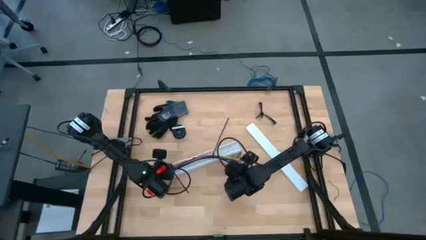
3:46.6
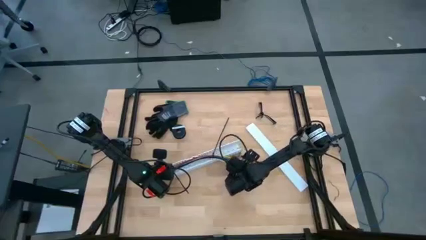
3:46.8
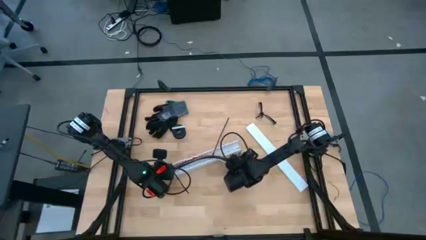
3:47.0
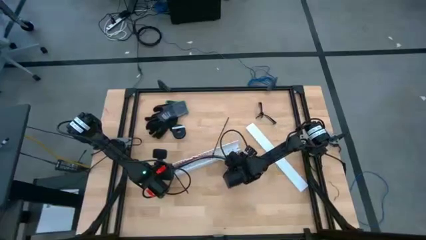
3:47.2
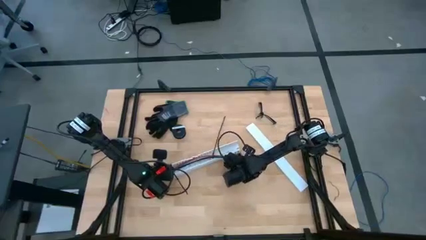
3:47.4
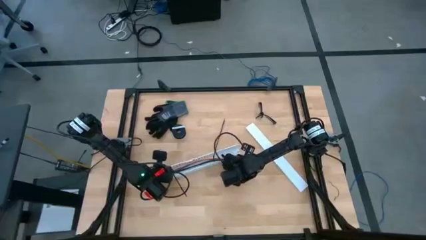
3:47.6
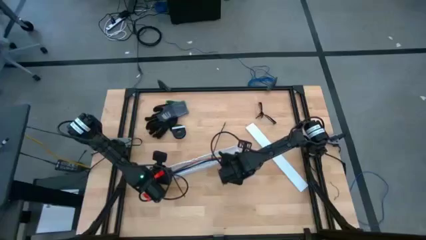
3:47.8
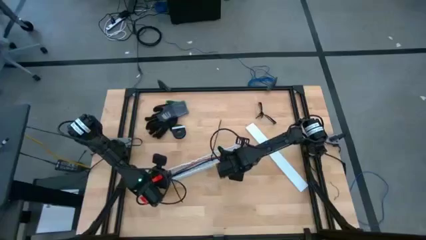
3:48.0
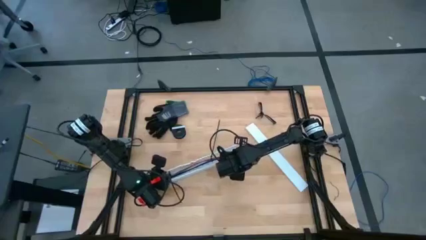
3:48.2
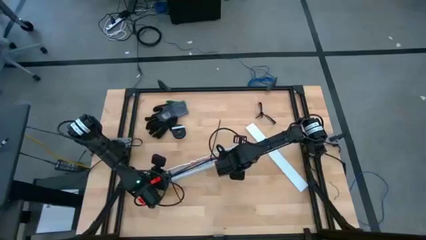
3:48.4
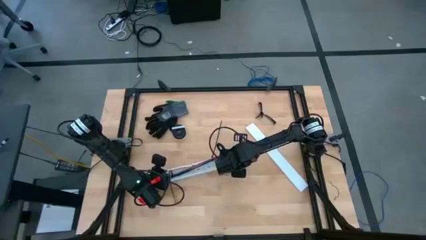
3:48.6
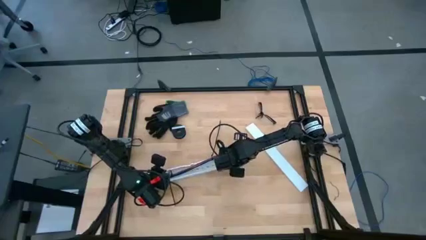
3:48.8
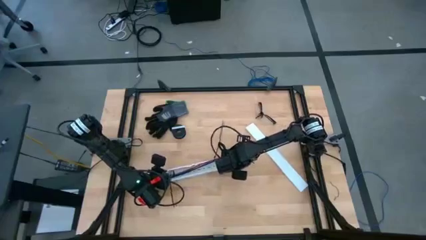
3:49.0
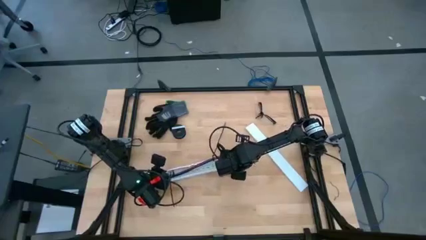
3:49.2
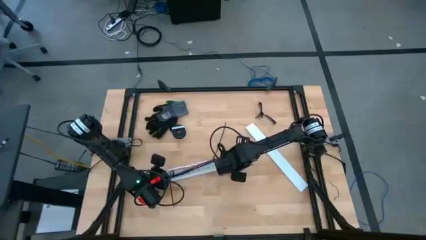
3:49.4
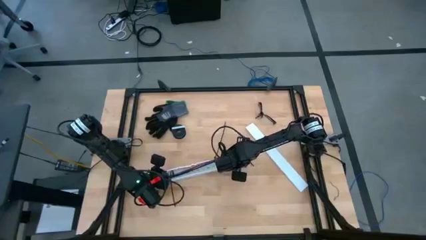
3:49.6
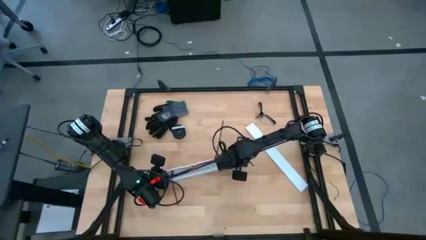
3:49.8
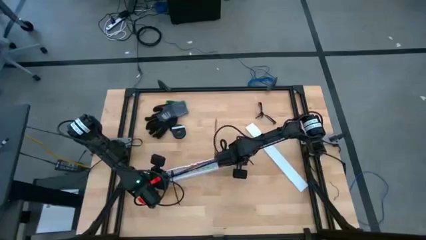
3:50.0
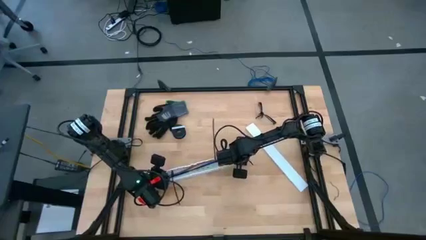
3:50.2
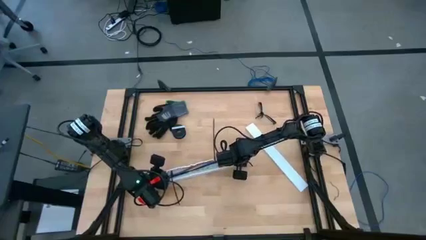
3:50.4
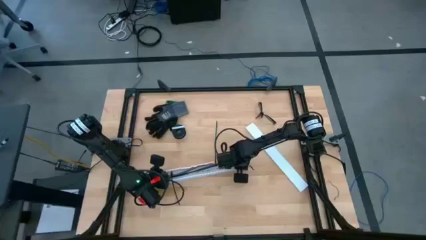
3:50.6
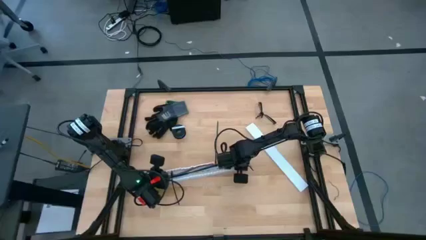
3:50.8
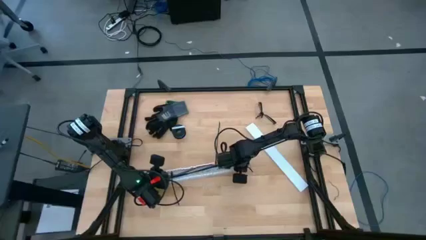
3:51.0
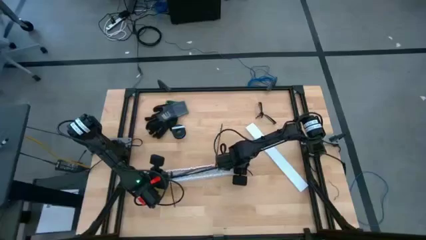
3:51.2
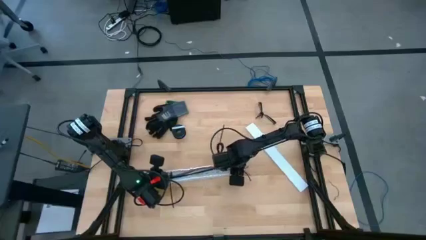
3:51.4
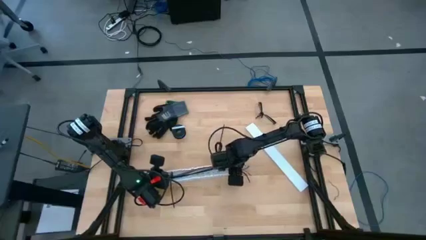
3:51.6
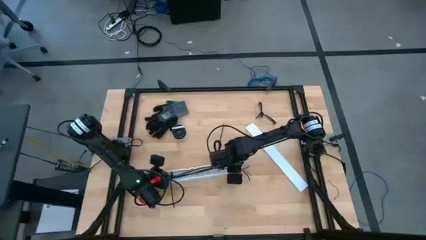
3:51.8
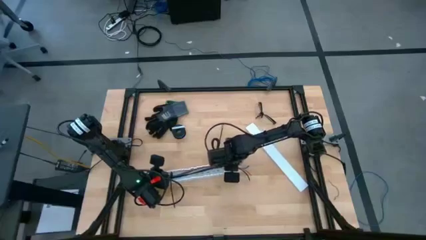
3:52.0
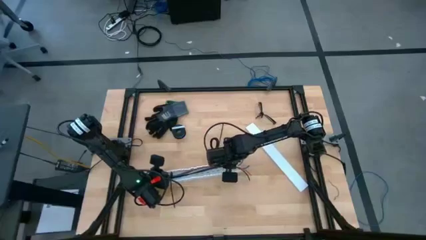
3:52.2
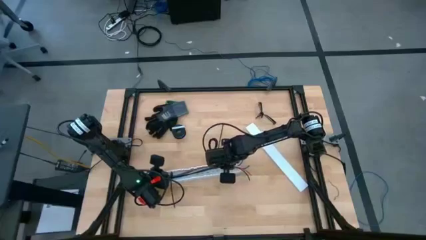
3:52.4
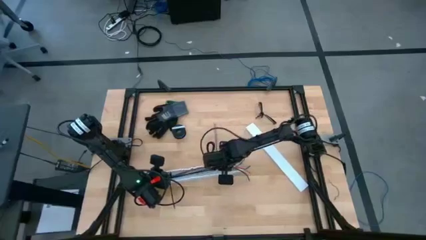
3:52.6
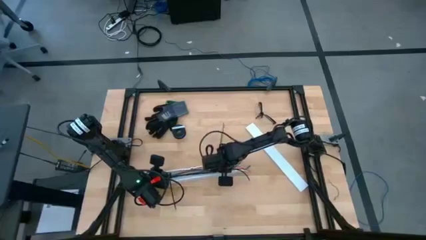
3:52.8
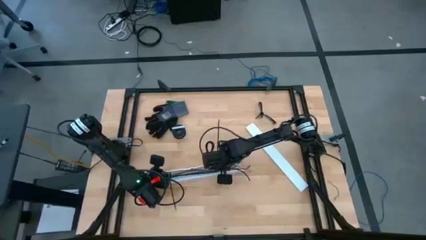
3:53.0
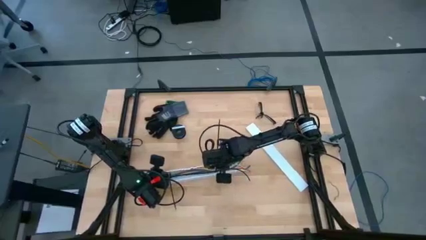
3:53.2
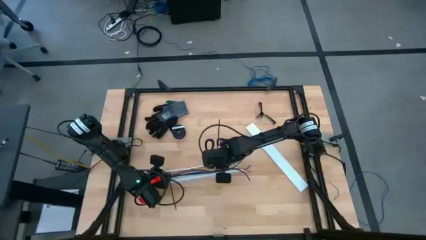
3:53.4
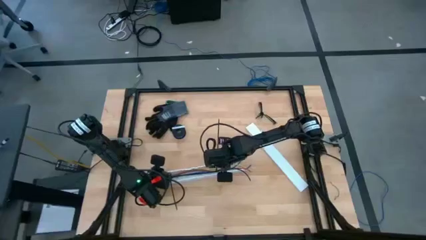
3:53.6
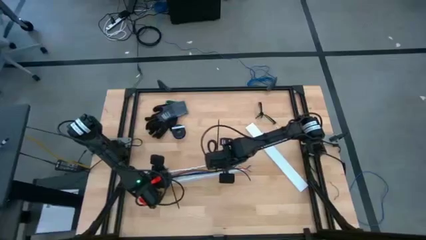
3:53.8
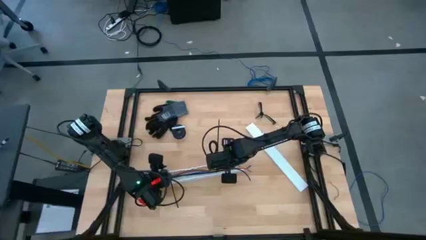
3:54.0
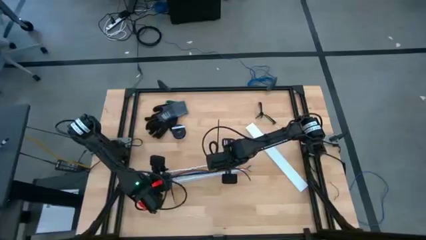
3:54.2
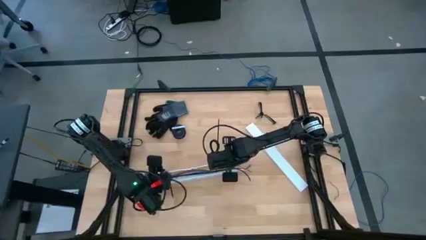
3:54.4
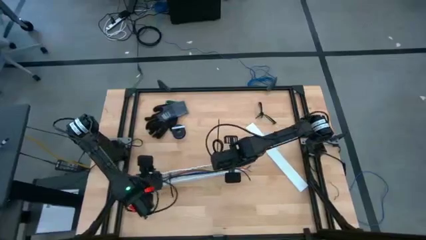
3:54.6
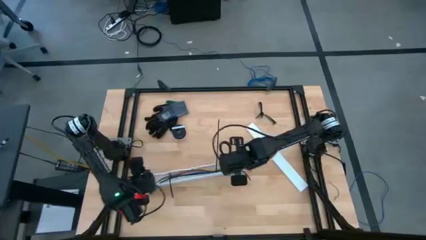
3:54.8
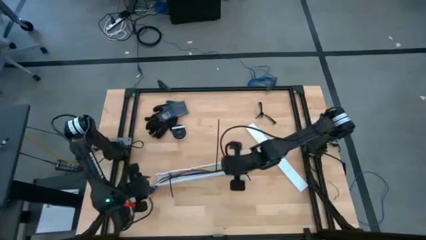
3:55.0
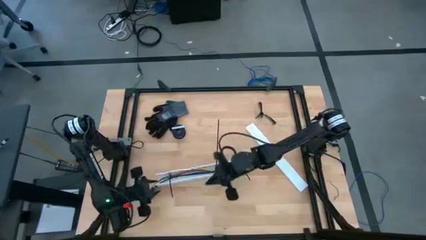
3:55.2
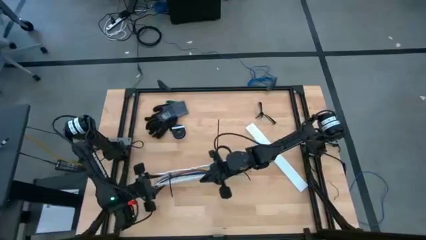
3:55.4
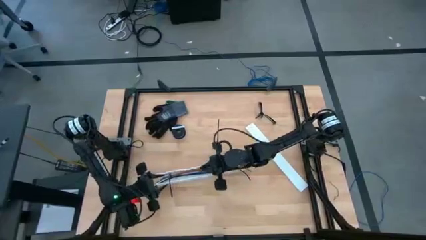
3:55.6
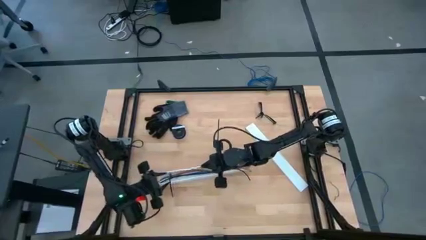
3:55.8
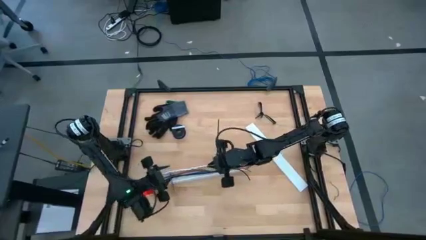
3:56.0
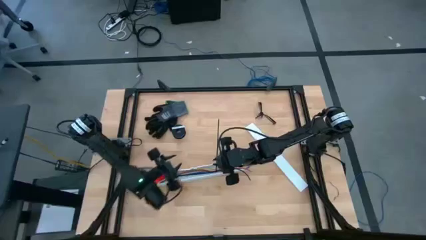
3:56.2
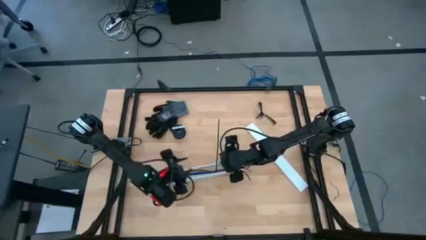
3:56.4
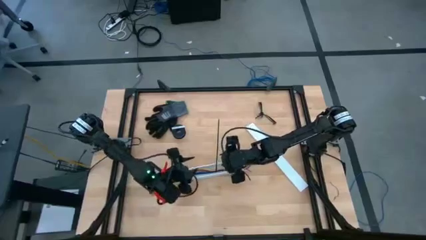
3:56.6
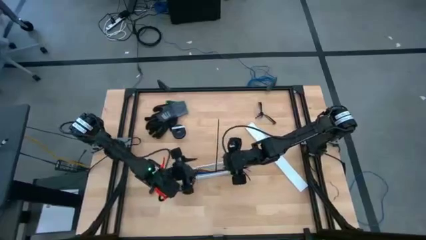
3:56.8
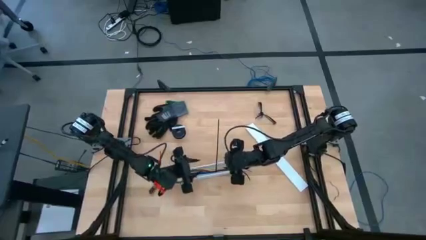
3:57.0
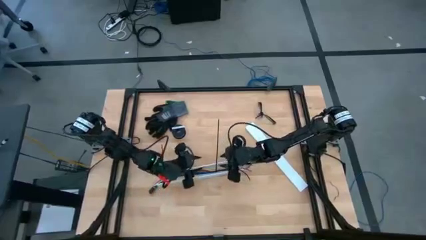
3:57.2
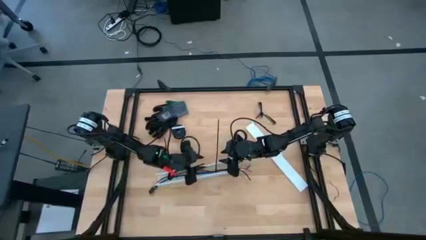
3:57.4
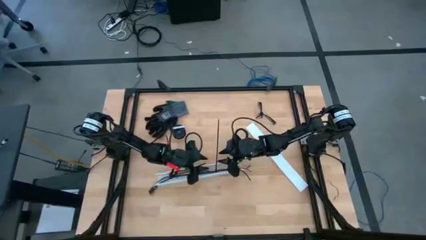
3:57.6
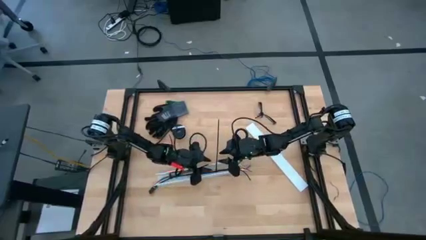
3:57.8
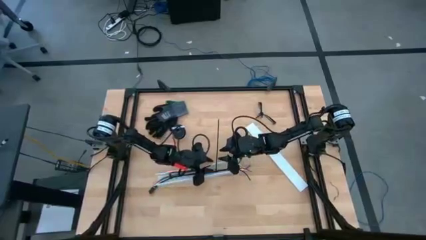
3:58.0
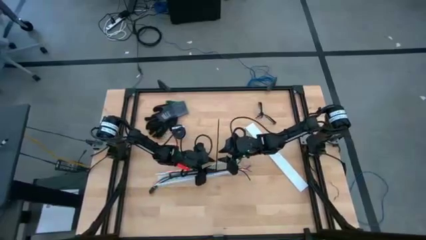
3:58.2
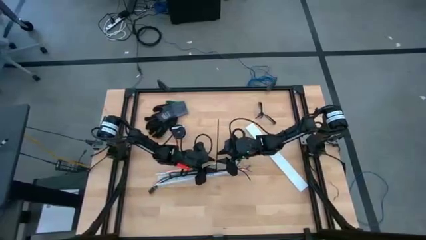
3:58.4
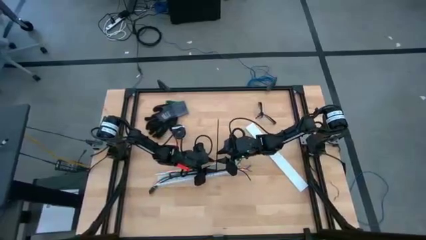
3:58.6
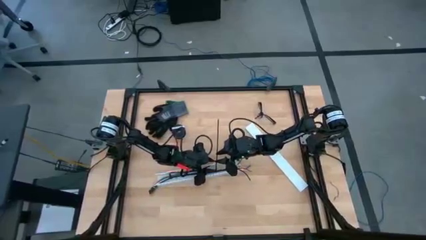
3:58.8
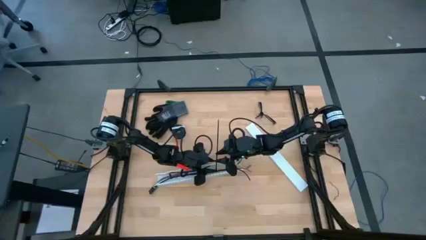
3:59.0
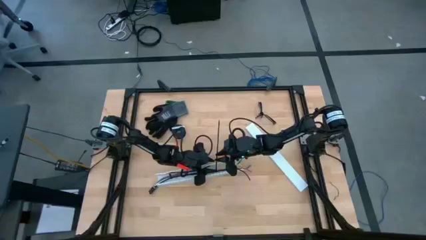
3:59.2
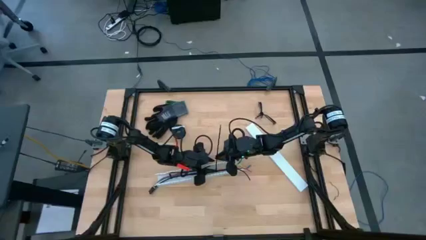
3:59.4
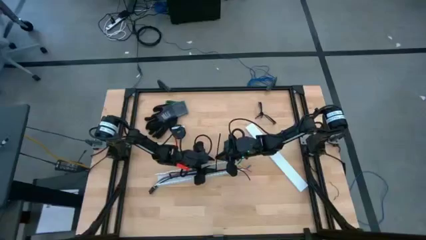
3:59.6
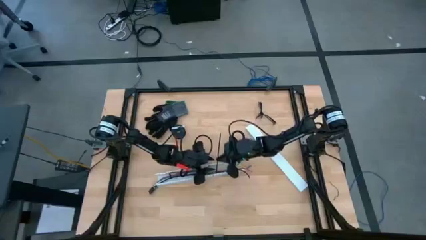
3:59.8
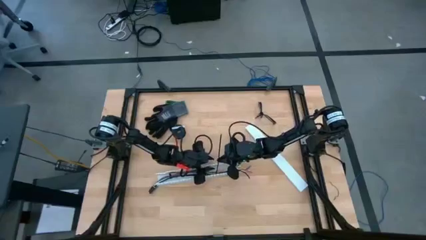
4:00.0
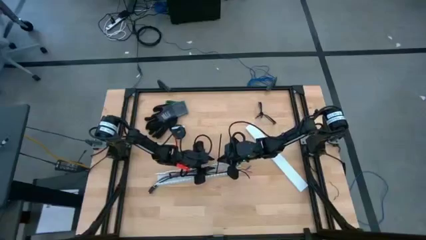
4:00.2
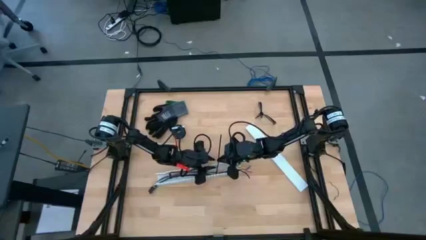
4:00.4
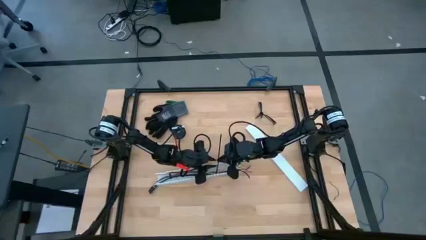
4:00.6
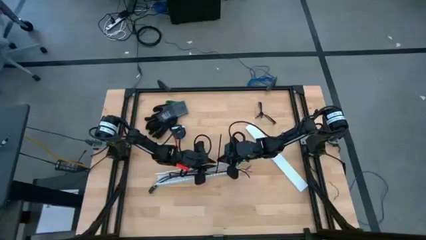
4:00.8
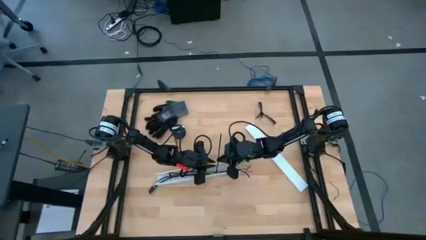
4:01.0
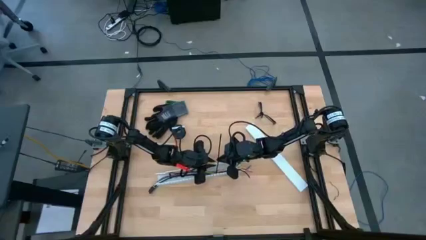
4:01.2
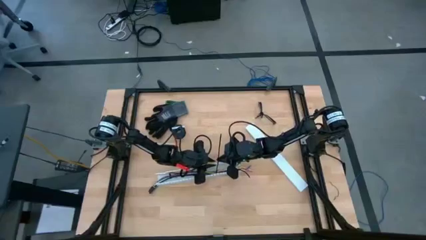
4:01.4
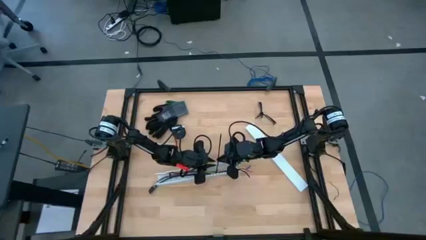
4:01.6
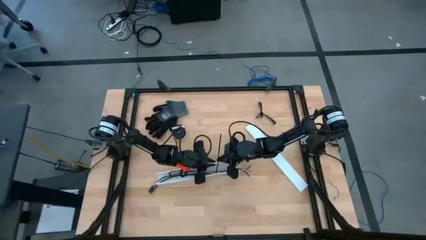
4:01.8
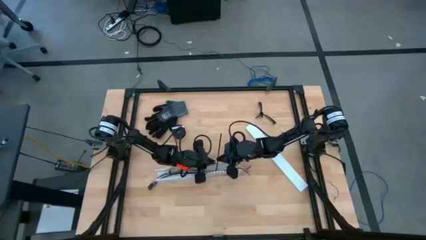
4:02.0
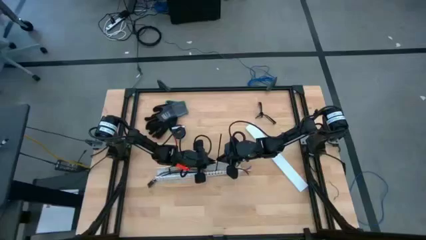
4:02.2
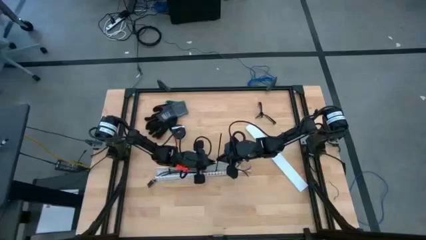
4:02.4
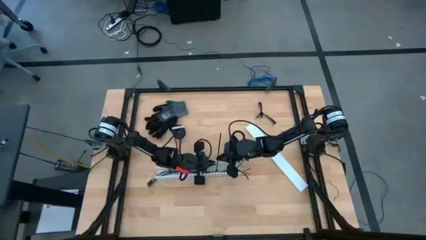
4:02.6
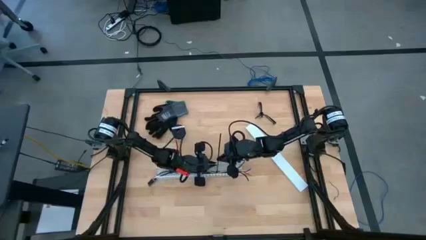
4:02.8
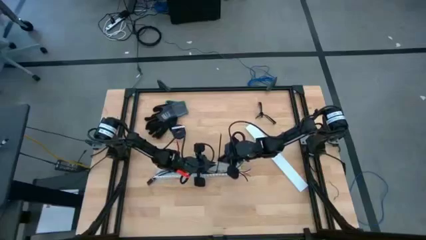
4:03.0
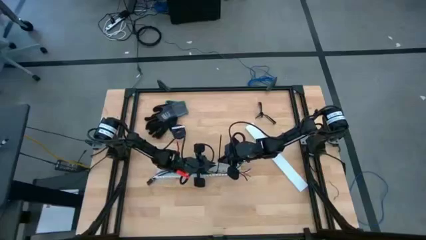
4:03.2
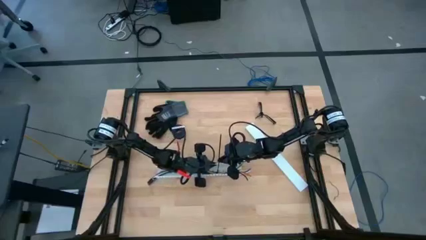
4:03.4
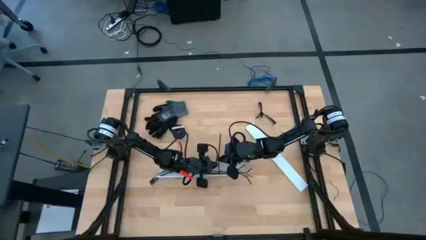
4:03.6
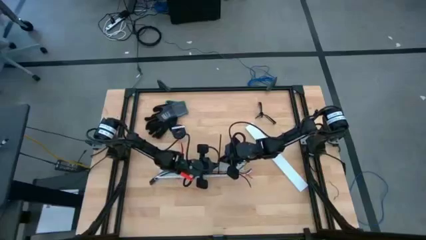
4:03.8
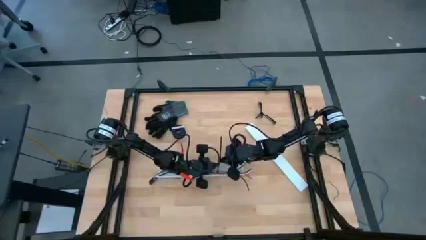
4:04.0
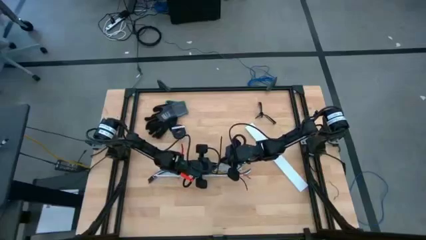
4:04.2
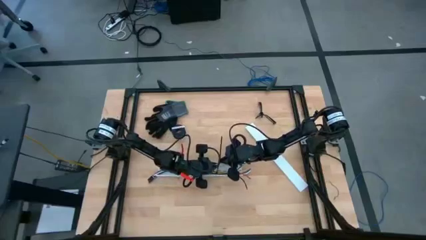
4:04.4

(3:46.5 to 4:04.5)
Task: Ziptie cables
Put the zip tied cable wires into the white cable duct
